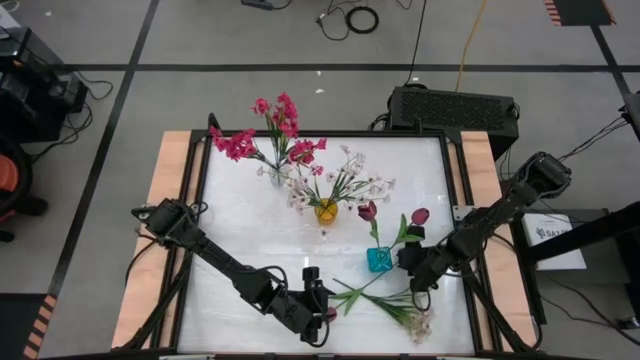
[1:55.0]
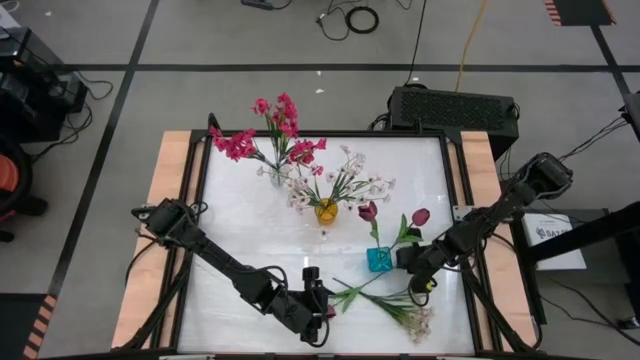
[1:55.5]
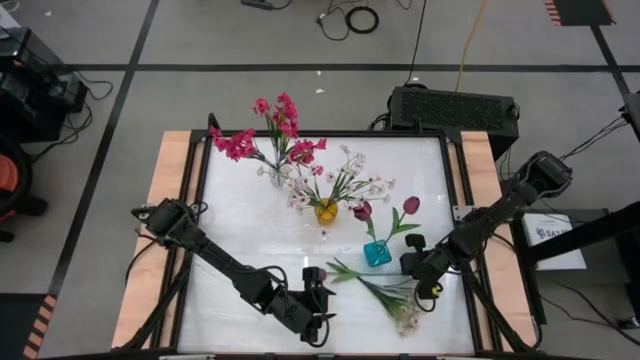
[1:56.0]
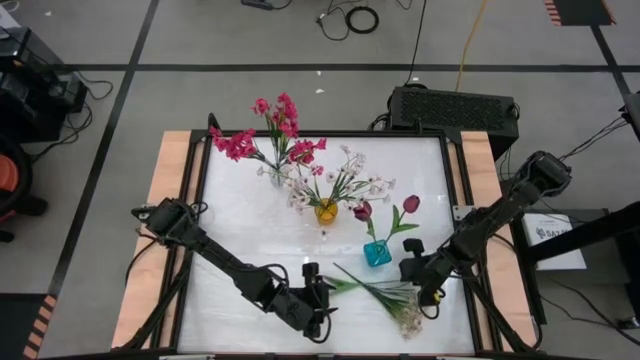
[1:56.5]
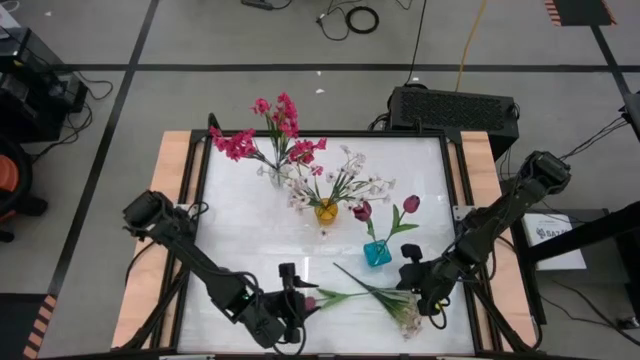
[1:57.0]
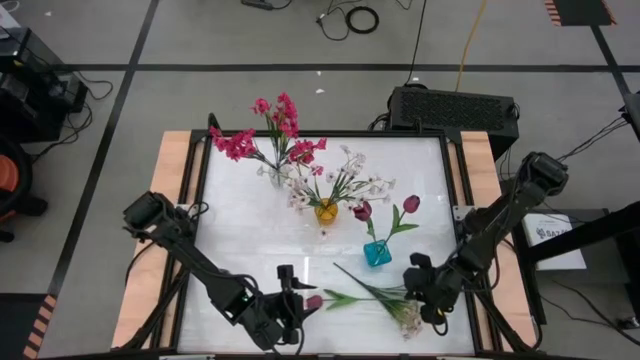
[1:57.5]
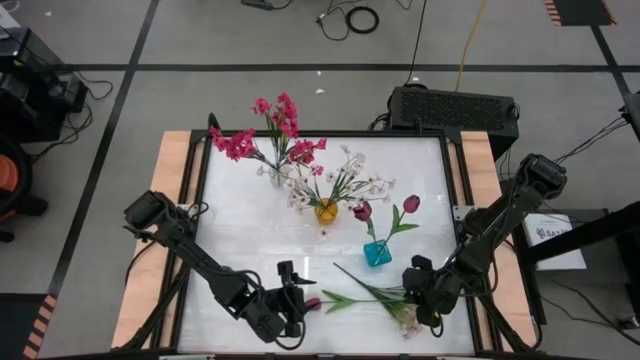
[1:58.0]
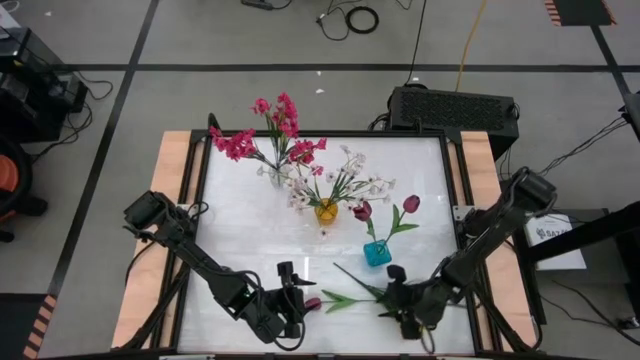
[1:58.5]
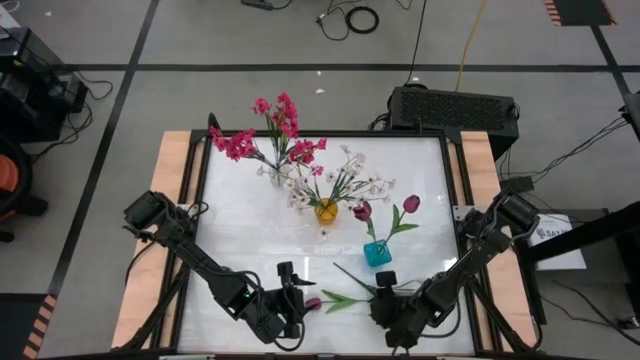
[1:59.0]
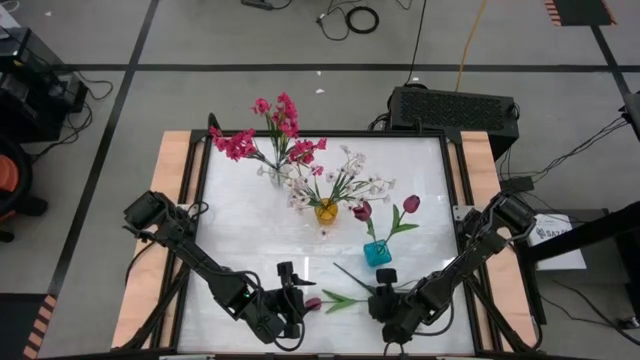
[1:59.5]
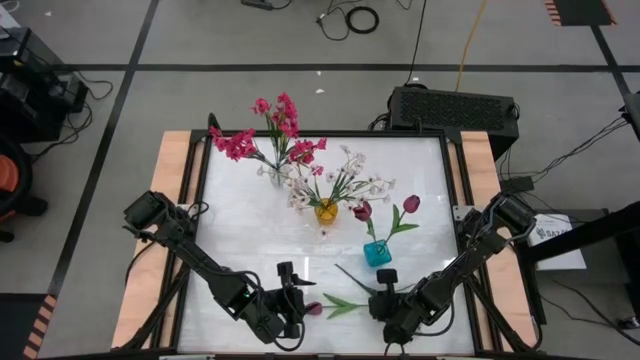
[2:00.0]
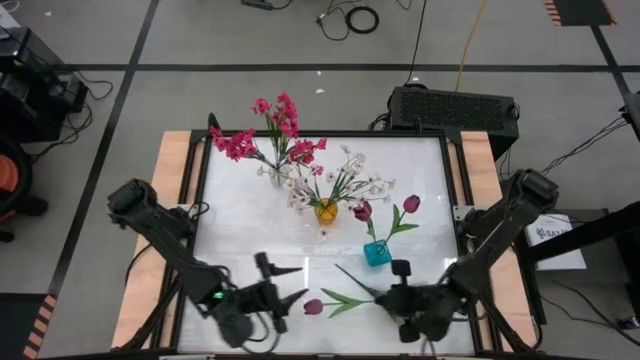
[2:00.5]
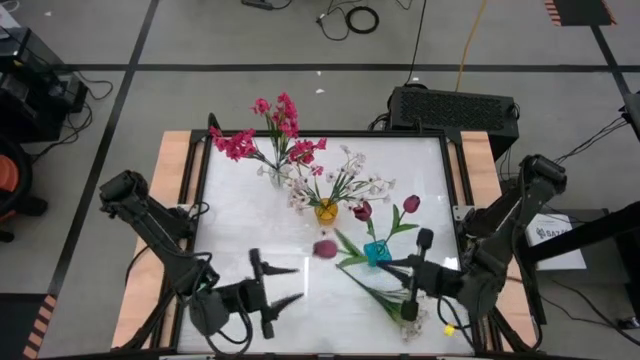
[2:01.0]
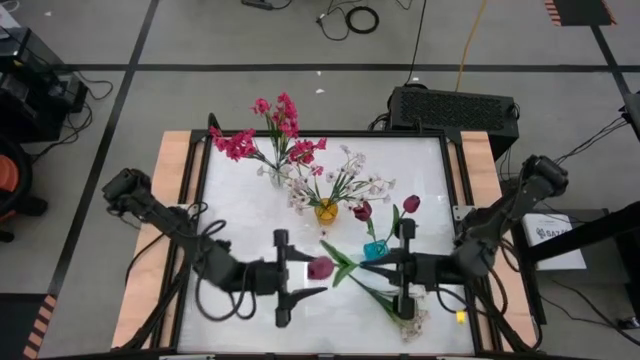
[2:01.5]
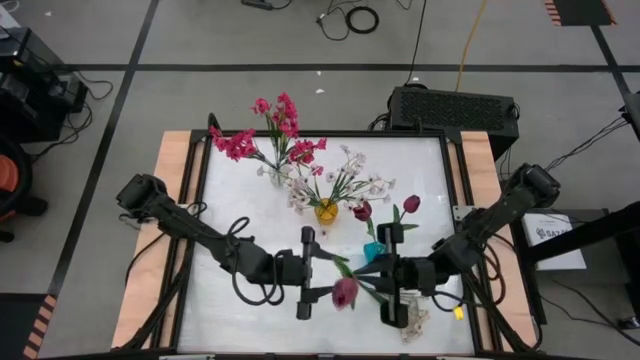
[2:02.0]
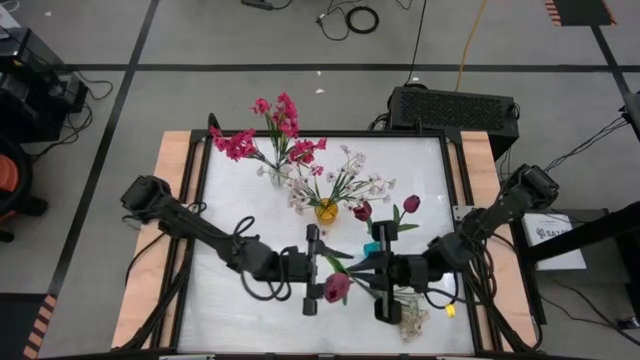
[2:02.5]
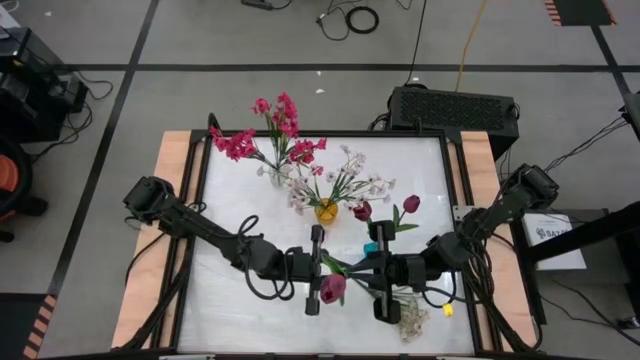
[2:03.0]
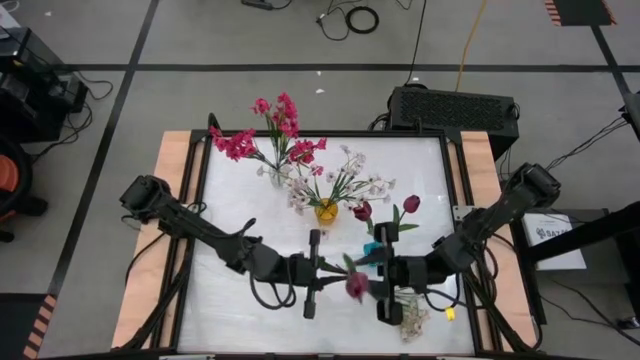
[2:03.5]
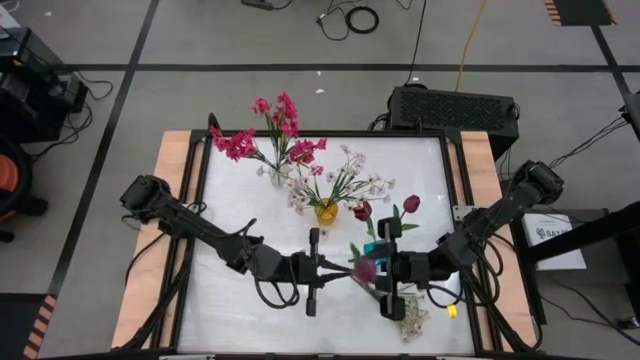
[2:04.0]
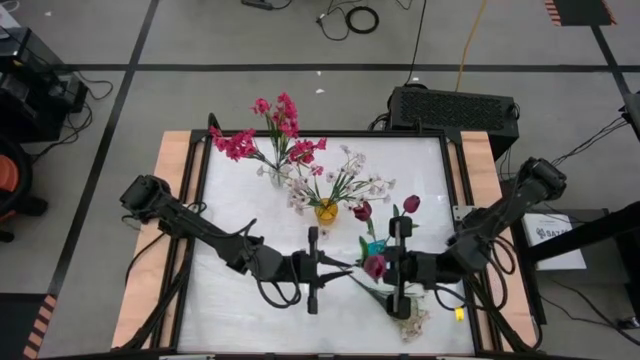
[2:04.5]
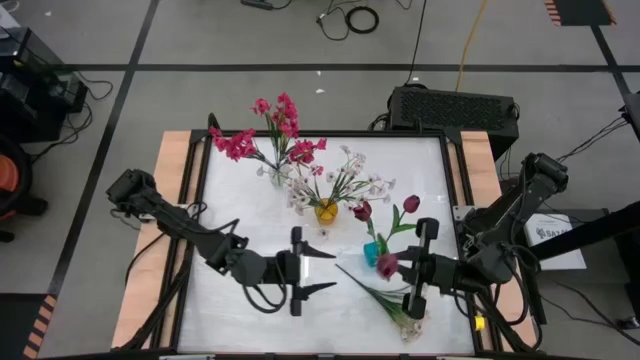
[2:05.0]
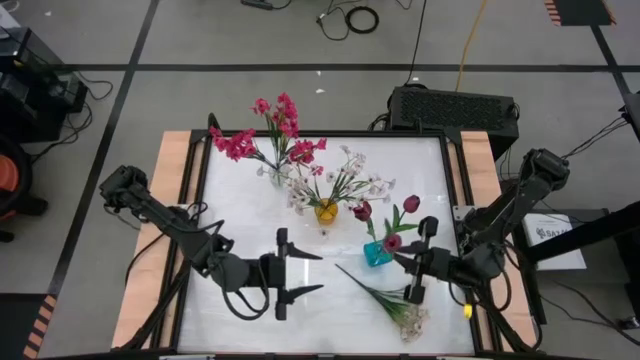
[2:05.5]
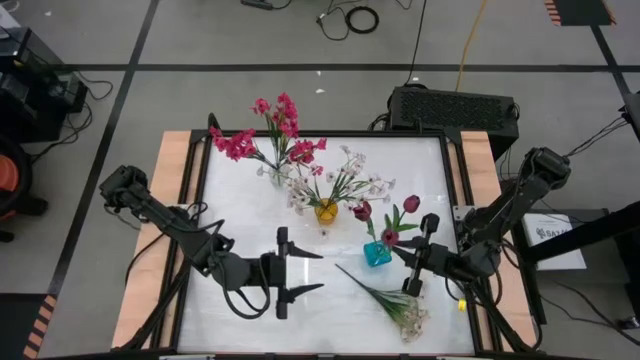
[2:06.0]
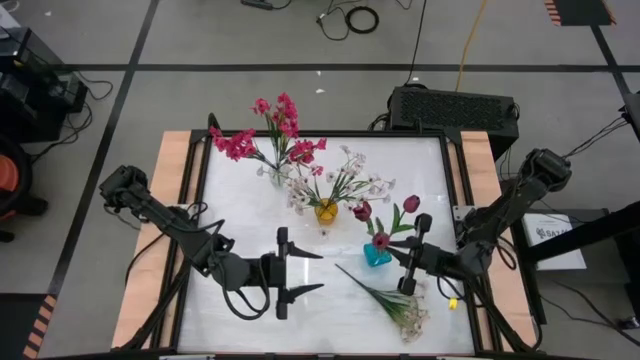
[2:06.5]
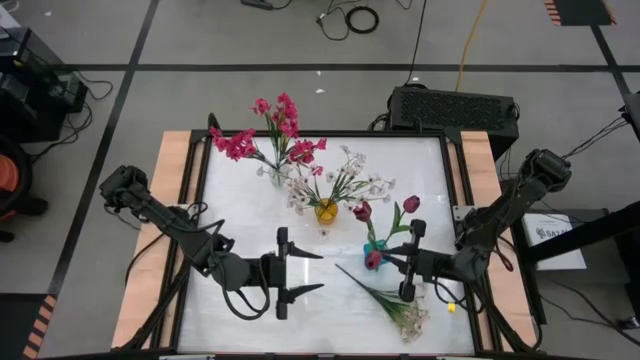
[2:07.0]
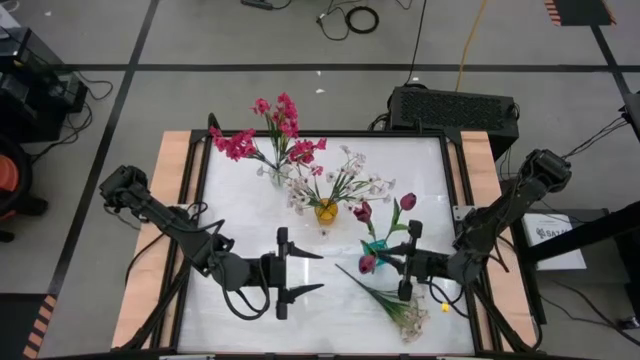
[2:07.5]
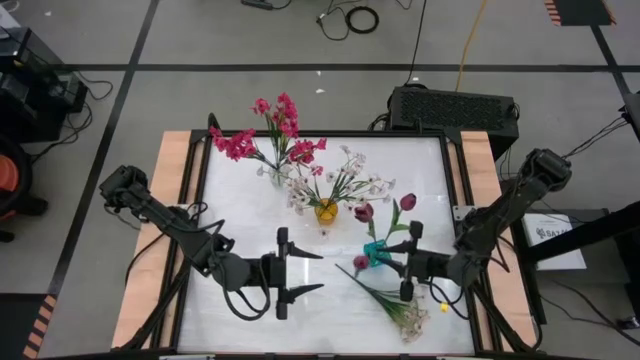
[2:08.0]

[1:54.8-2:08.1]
Task: Sort flowers into vase by color
Put the red flower into the blue vase

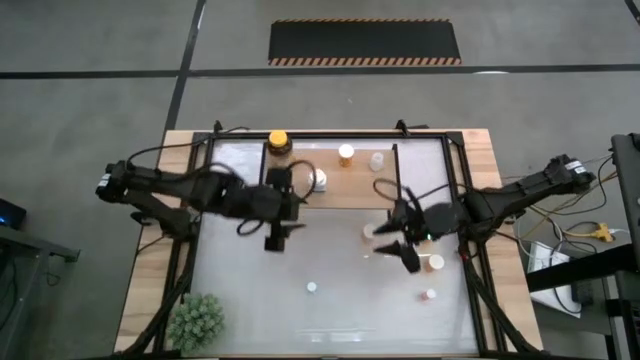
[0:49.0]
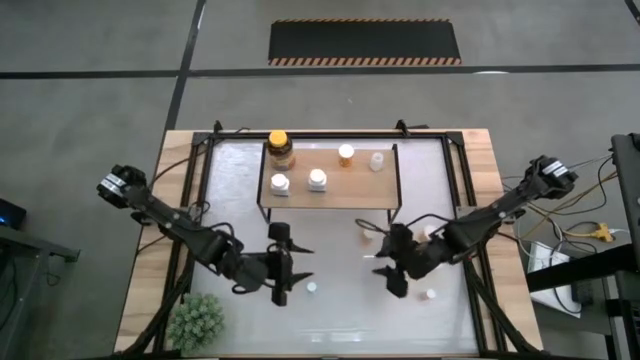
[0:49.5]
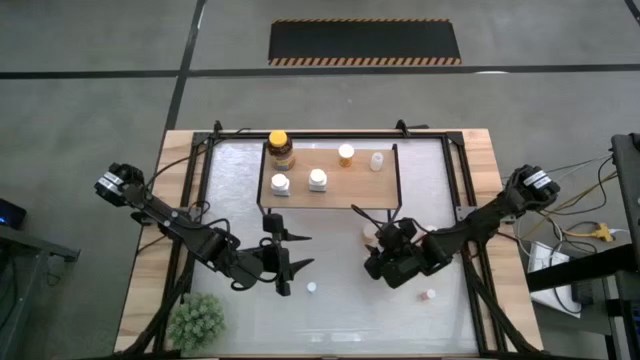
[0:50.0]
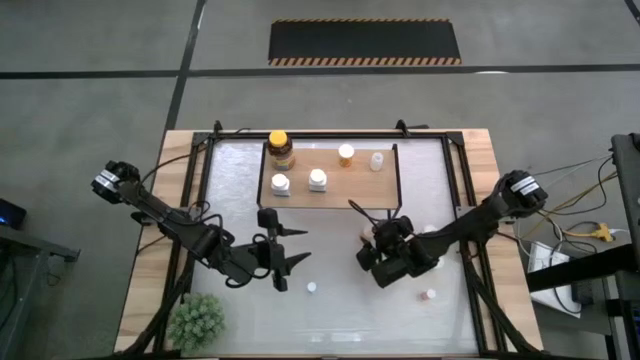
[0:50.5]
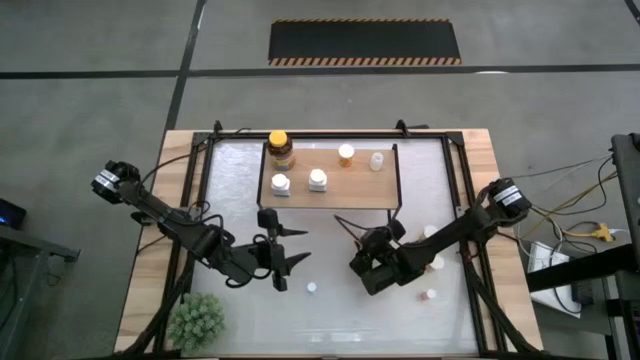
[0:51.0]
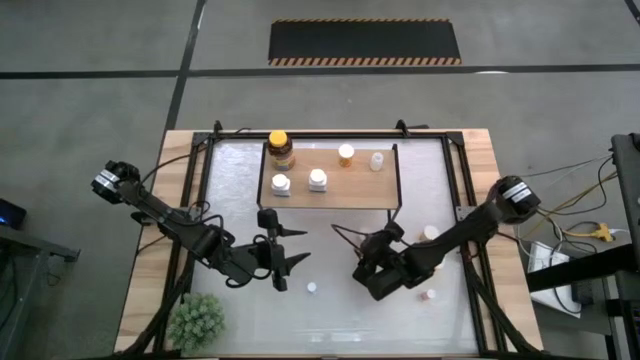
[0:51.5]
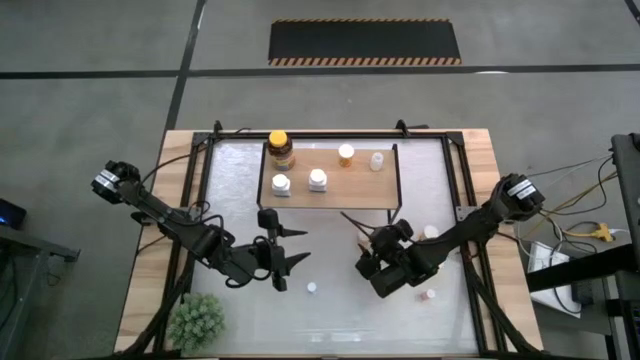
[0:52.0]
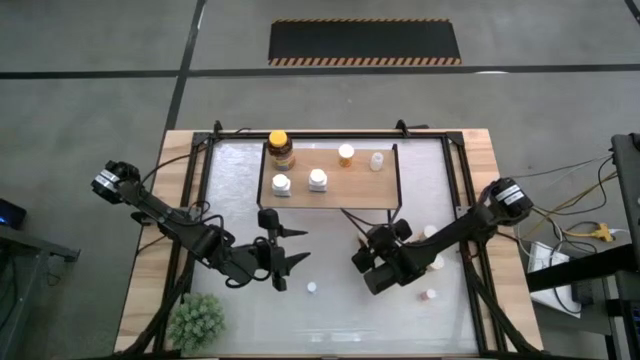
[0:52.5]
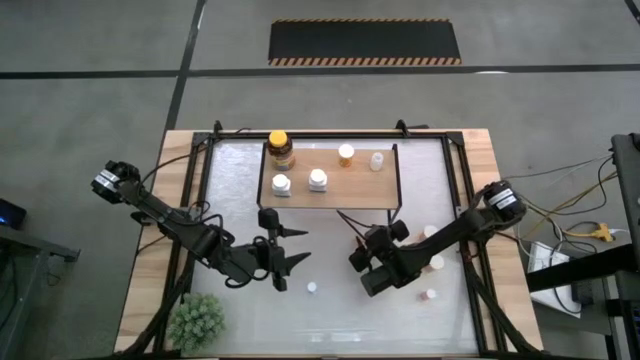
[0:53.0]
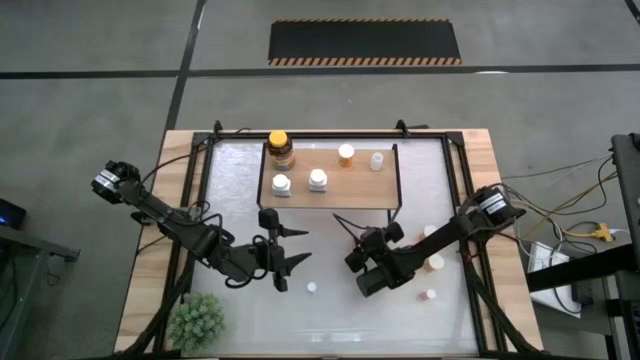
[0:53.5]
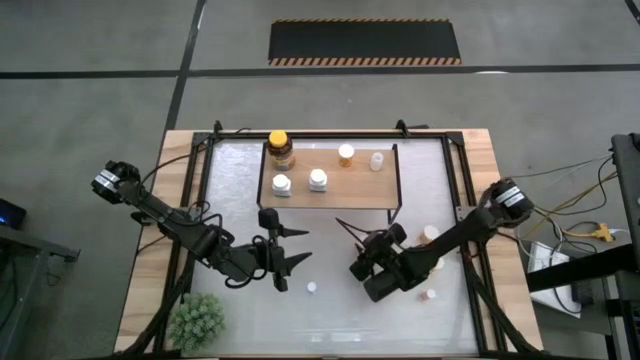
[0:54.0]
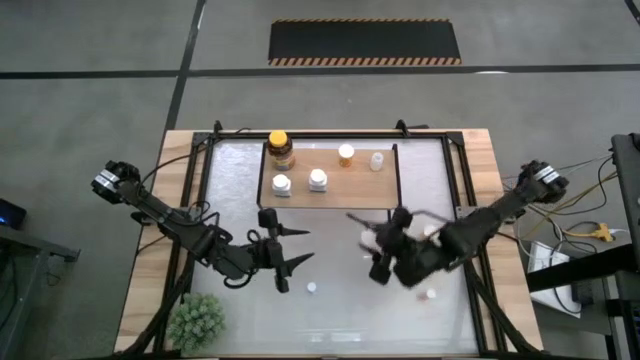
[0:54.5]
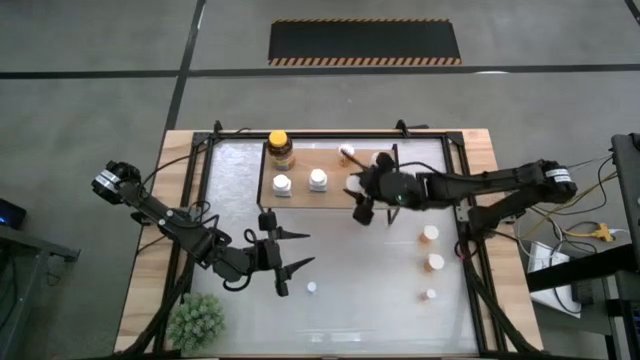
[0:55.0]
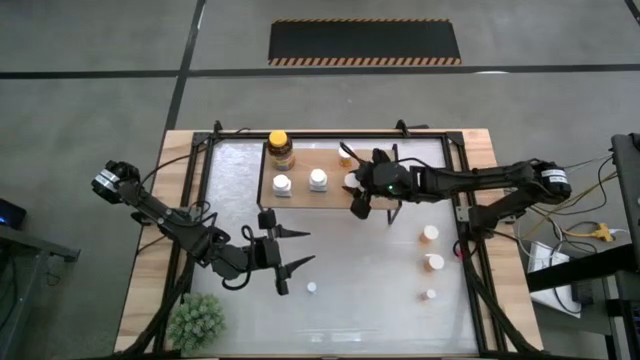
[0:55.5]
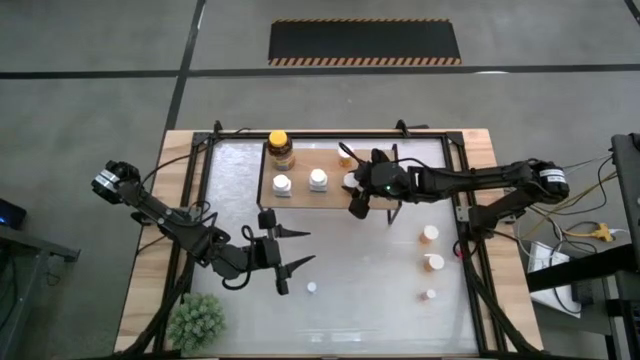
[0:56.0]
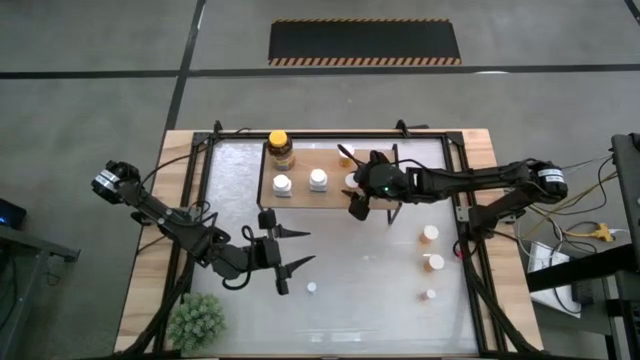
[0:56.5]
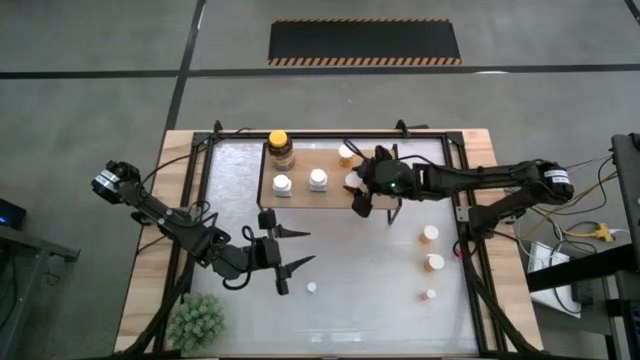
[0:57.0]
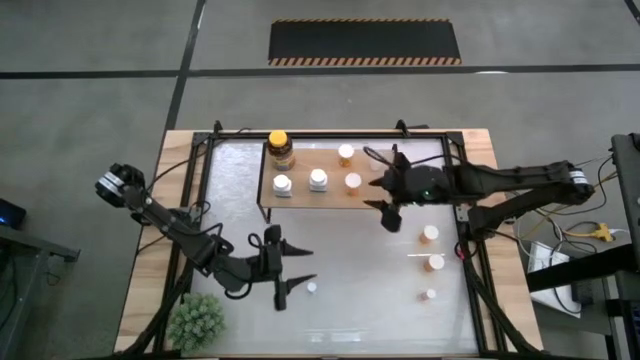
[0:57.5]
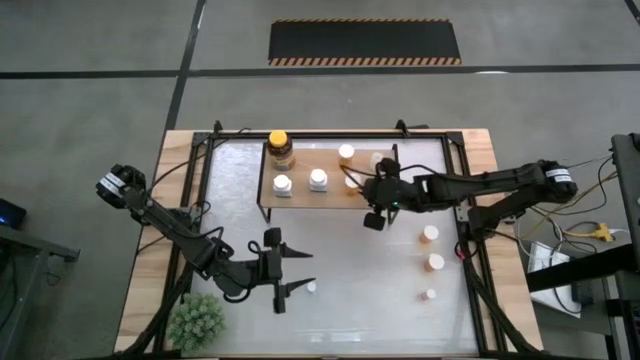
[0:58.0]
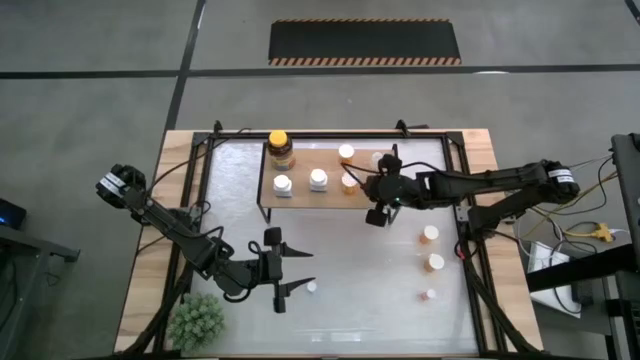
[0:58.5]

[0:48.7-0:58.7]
Task: Pick and place medicine bottles onto shelf by color
Put the orange pill bottle on the shelf aligned with the other orange pill bottle
